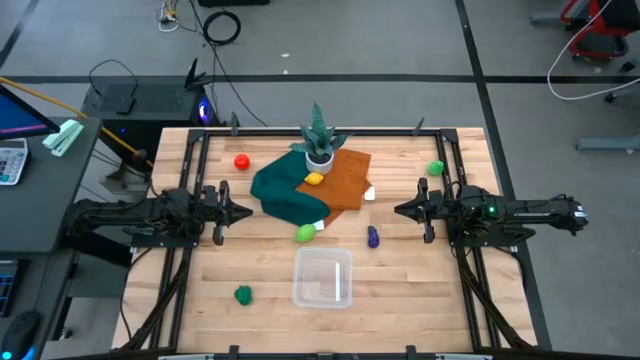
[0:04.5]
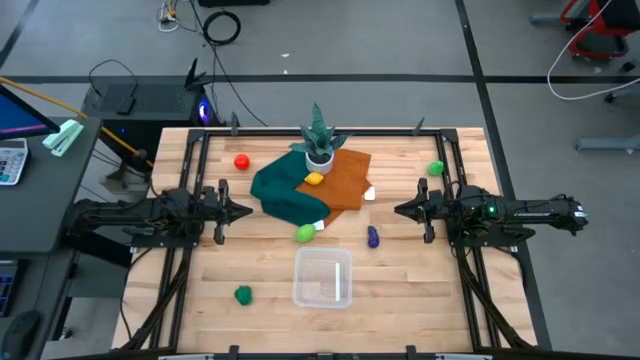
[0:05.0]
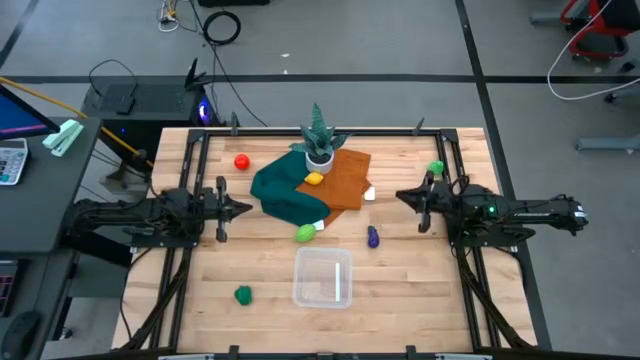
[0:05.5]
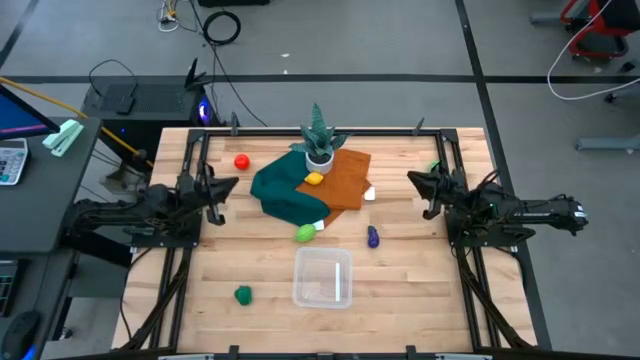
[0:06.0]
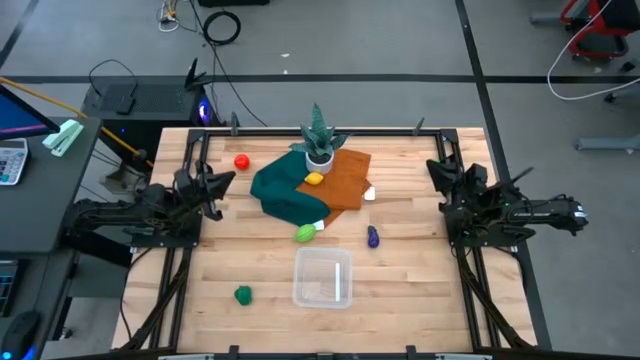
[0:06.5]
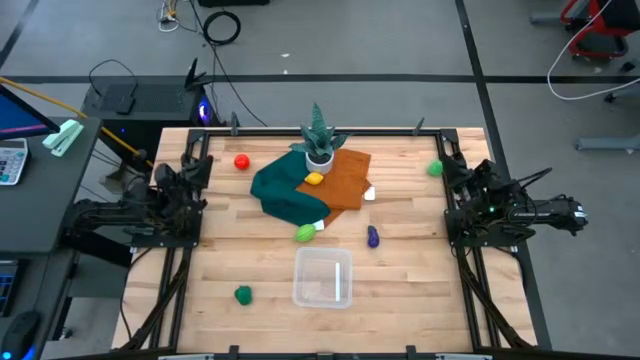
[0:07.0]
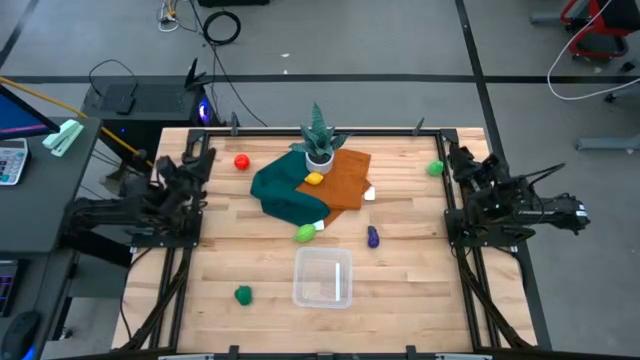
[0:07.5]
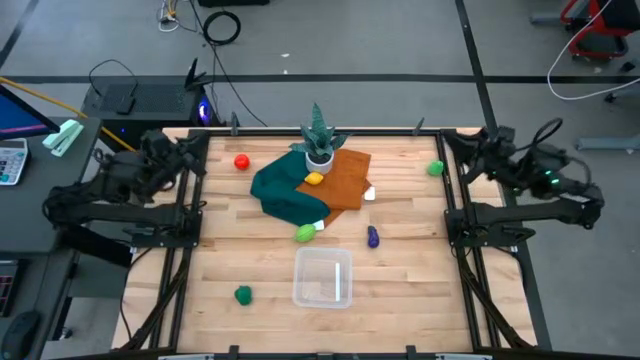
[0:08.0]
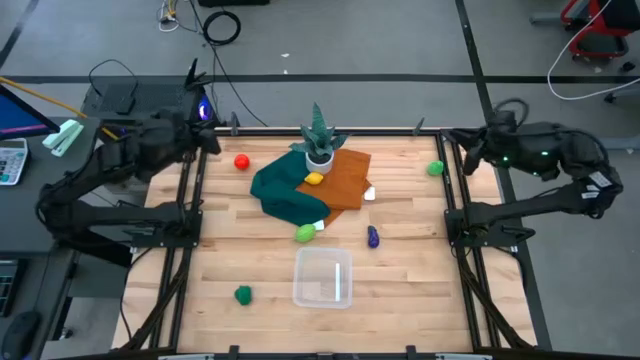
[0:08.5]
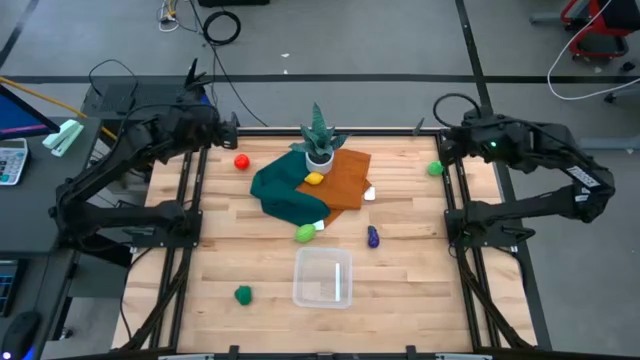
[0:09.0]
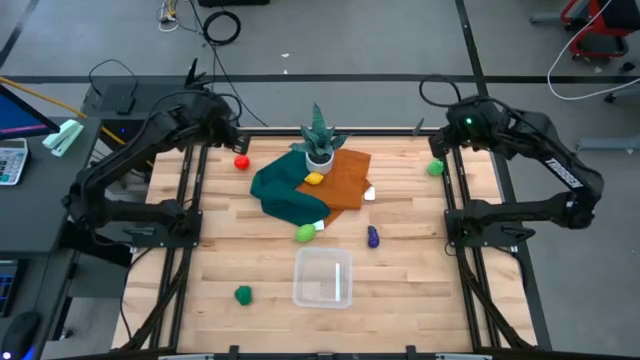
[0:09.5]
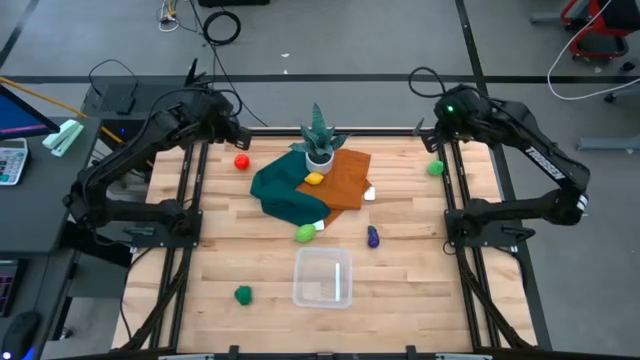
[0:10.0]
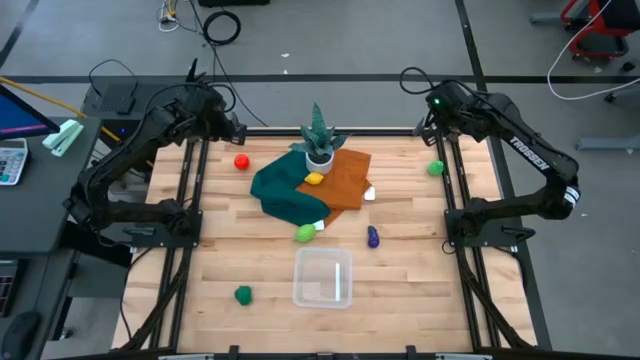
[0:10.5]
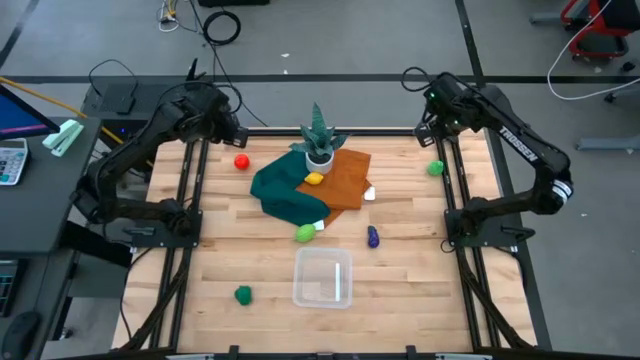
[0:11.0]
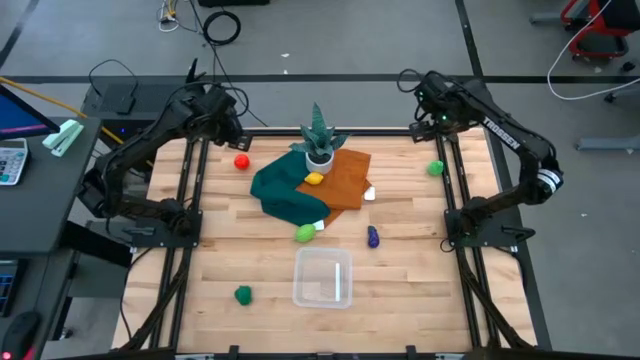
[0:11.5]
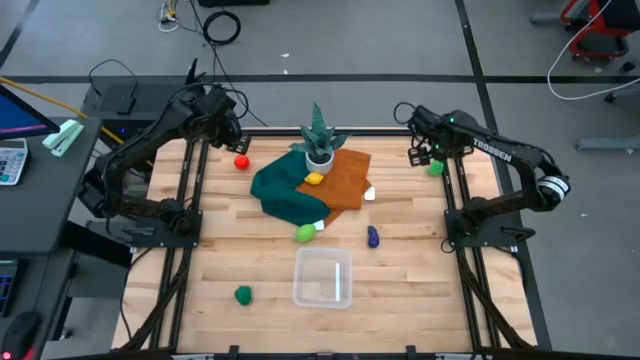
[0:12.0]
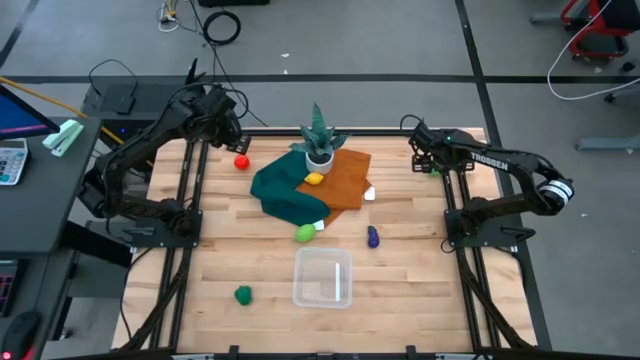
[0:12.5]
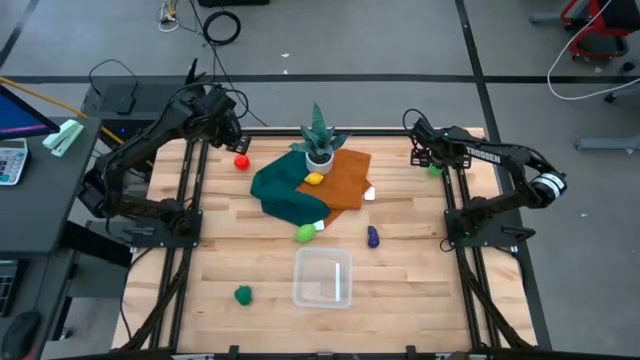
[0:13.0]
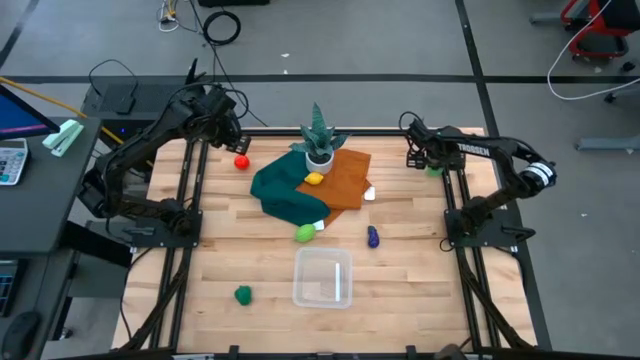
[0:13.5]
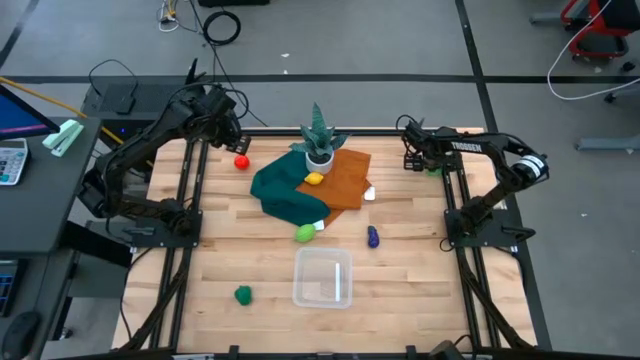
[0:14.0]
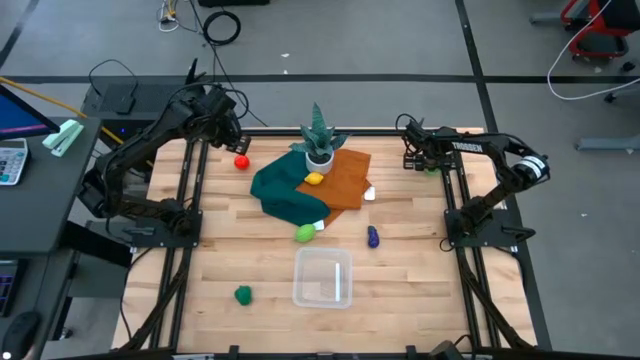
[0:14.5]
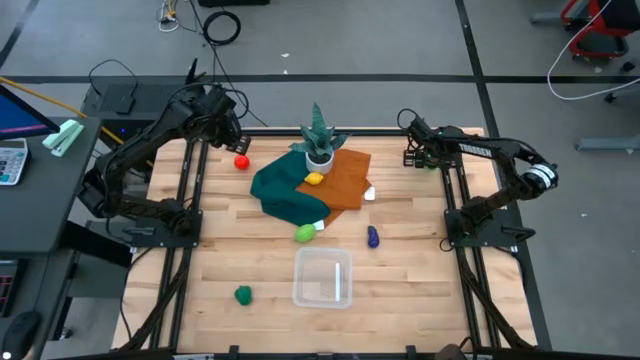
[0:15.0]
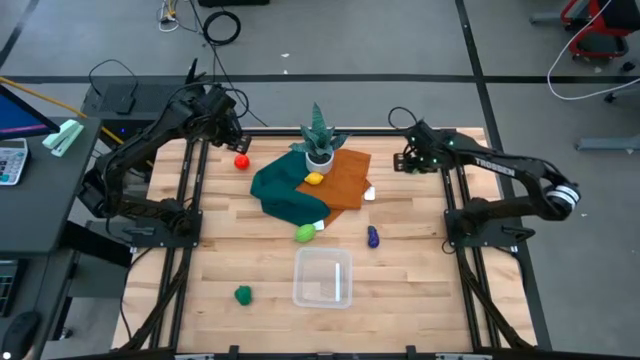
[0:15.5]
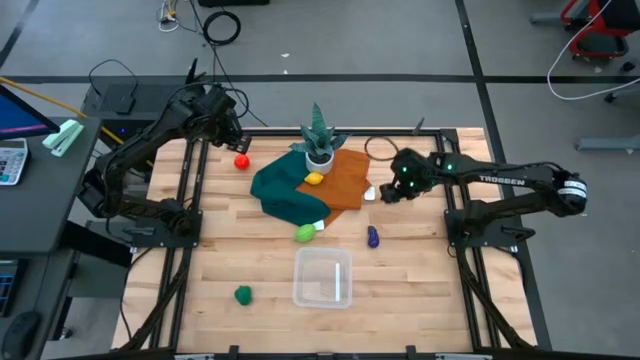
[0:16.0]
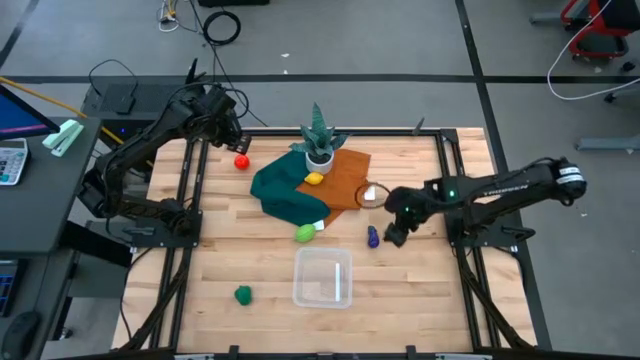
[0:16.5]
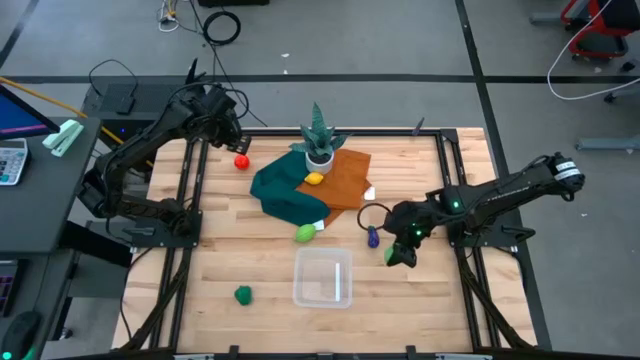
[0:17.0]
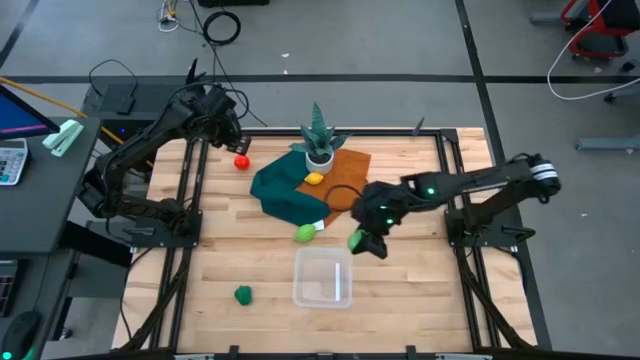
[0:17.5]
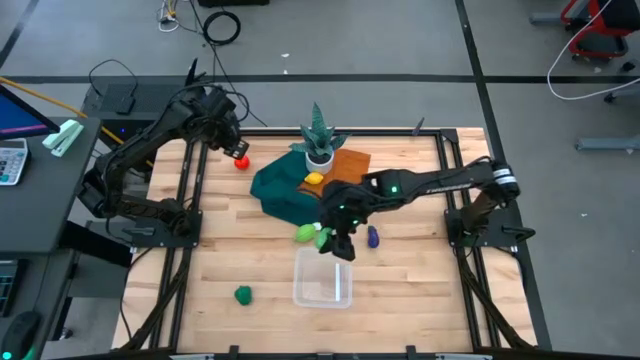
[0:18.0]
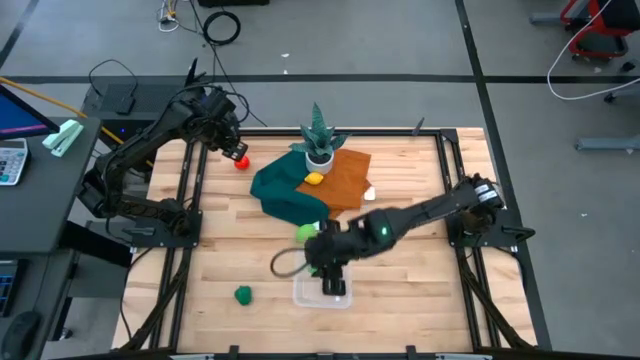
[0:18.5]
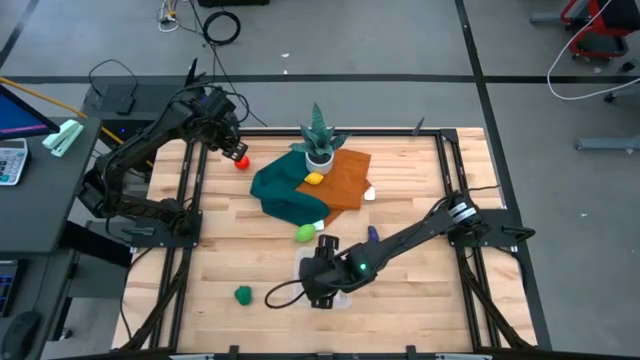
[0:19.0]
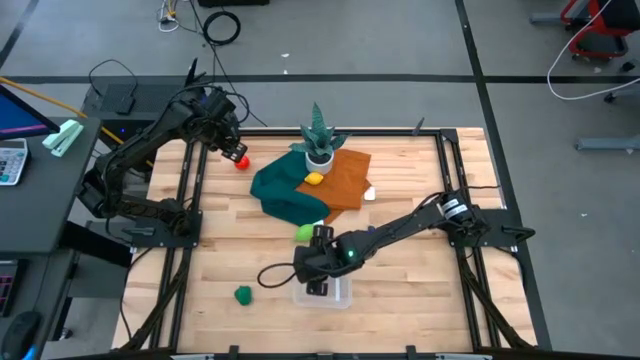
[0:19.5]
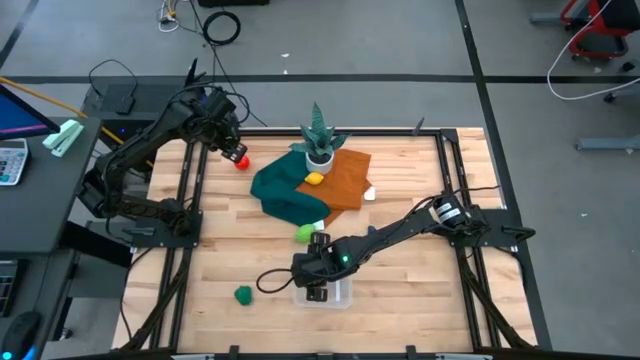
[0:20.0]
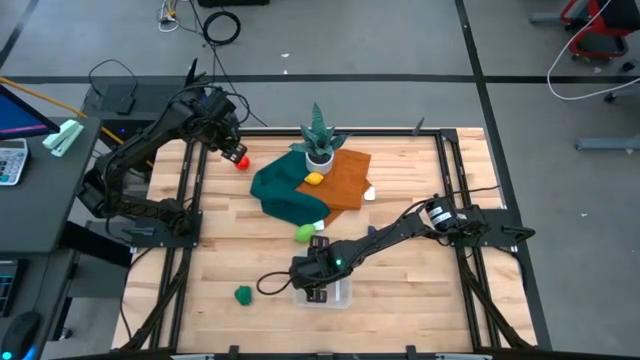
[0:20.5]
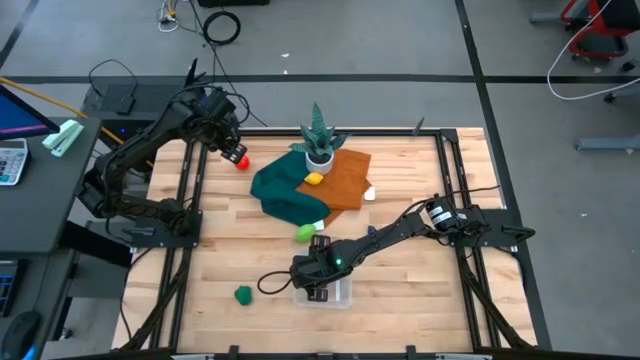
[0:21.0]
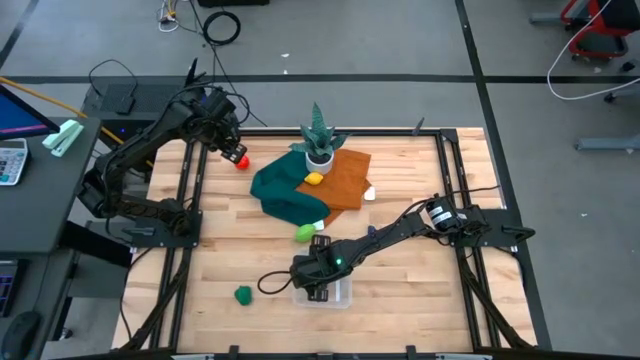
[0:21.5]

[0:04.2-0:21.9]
Task: Pick and placing Produce into tupperware
Put the green pear into the transparent bin

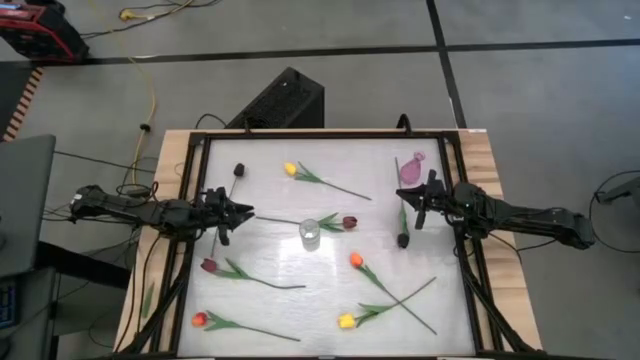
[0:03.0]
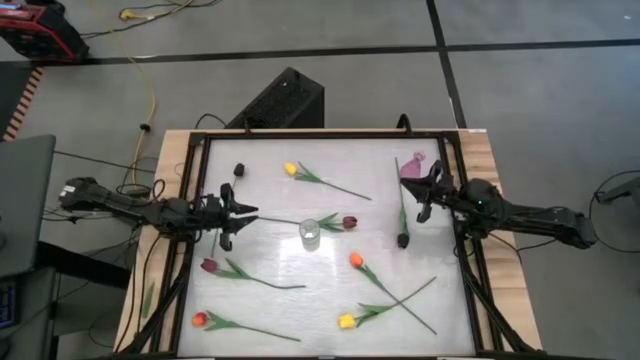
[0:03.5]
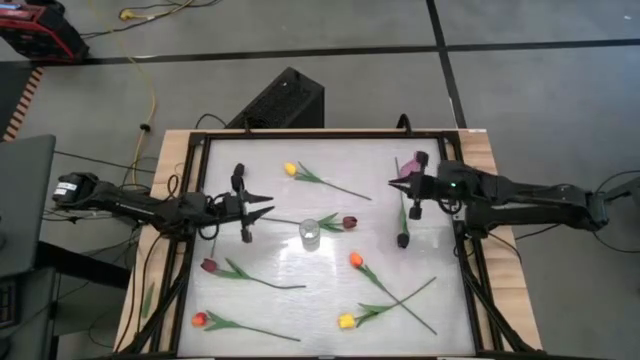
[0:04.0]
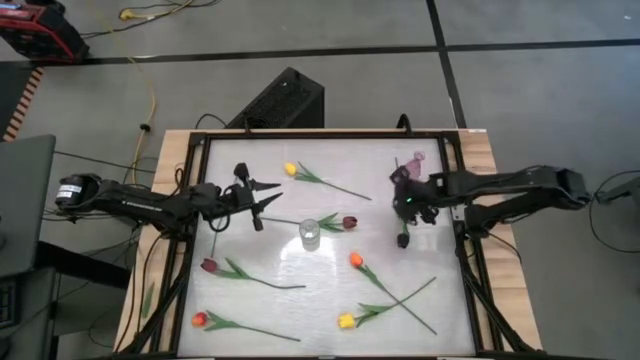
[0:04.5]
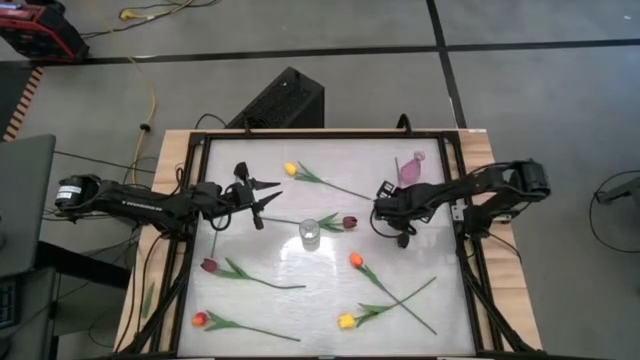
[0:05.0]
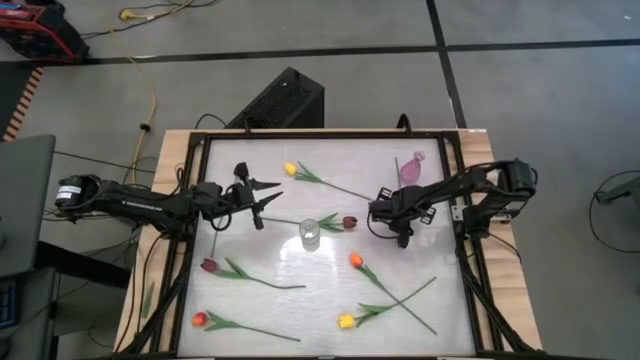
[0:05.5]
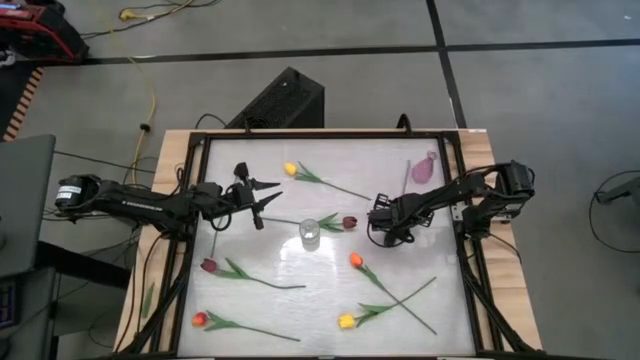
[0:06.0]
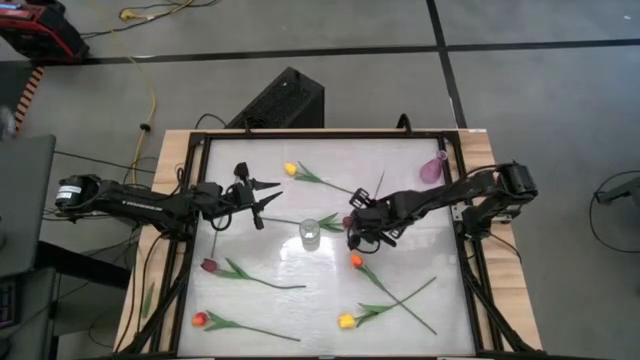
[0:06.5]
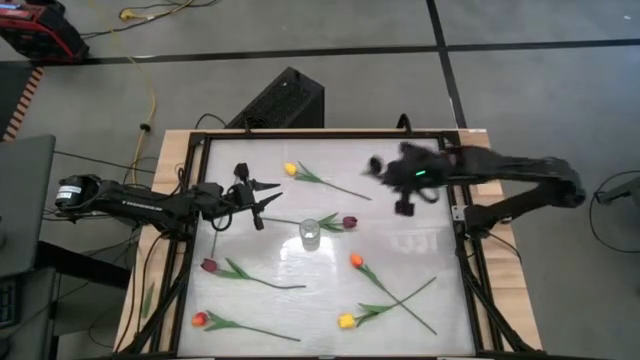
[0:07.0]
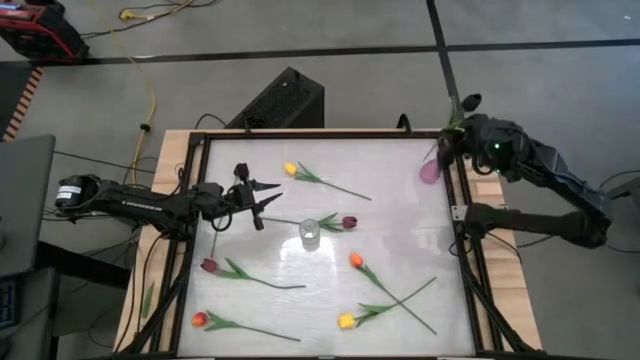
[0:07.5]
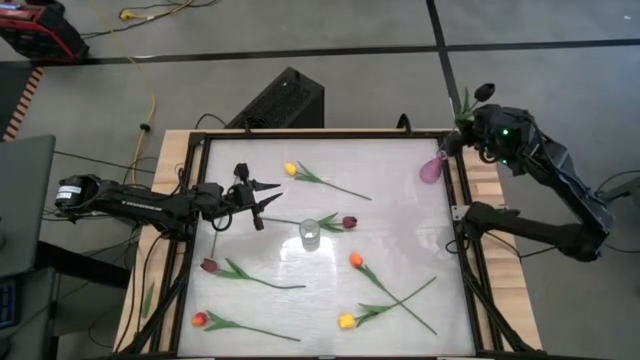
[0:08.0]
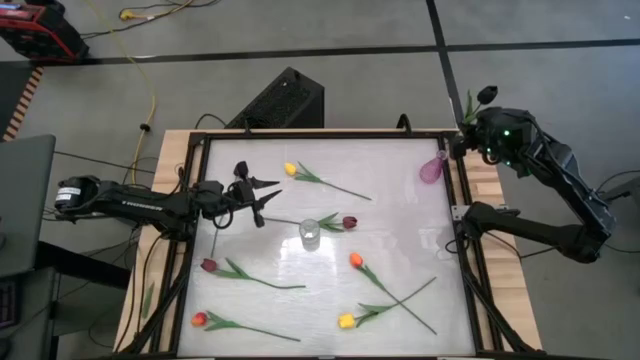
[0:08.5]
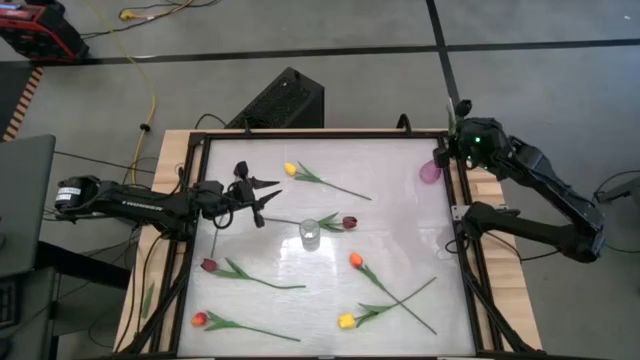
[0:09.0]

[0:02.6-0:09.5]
Task: Sort flowers into vase by color
Put the right black flower into the violet vase
